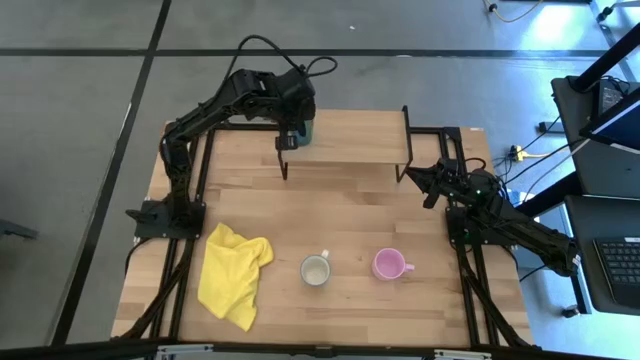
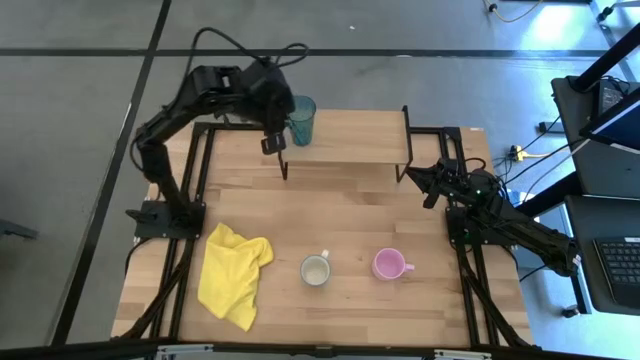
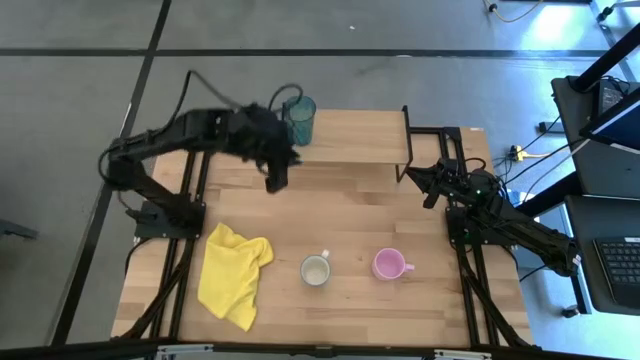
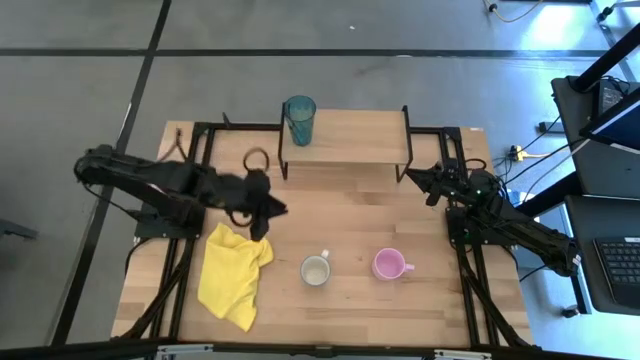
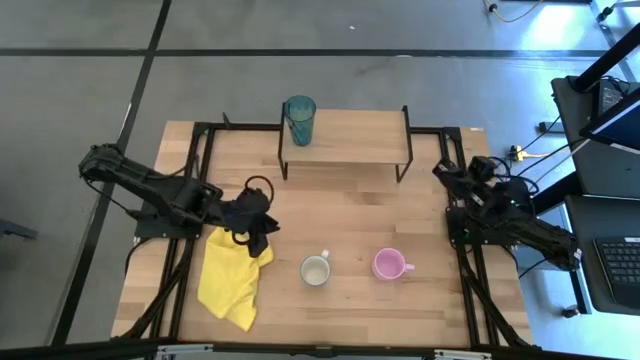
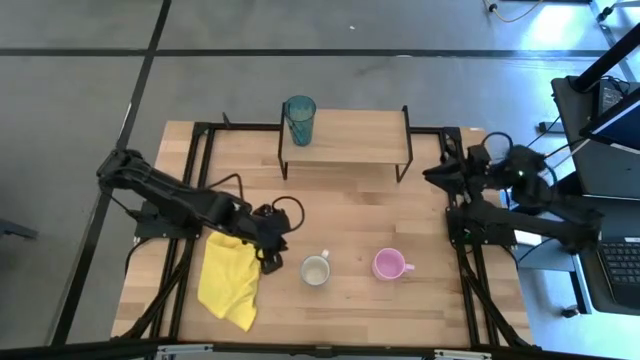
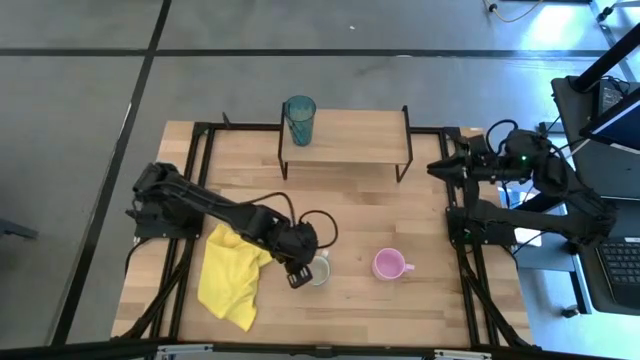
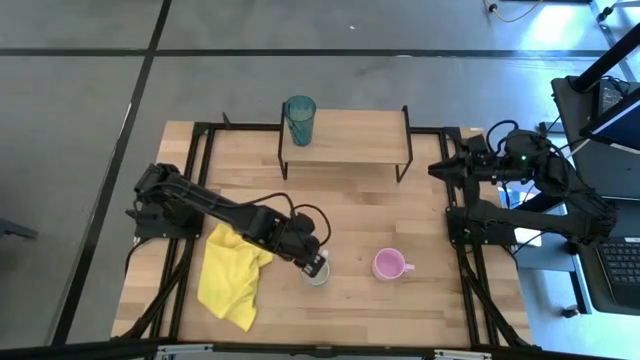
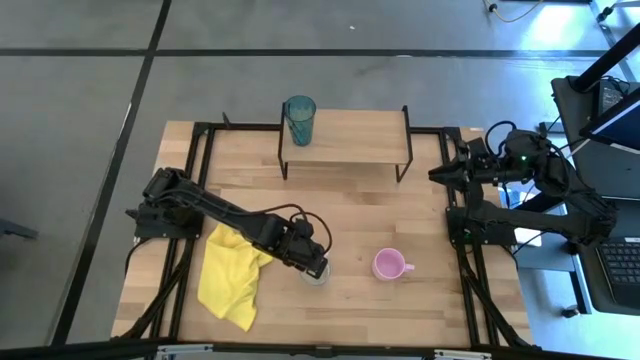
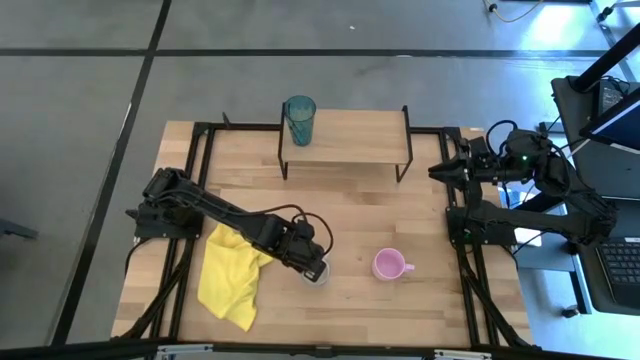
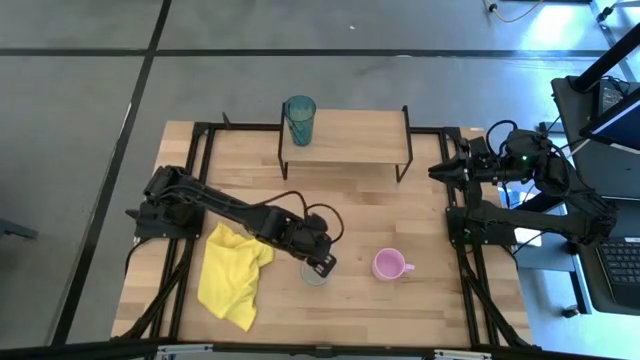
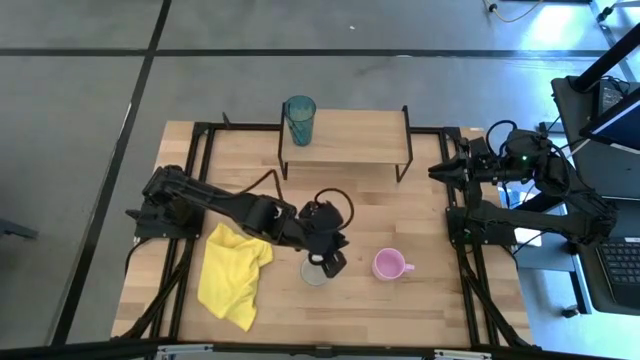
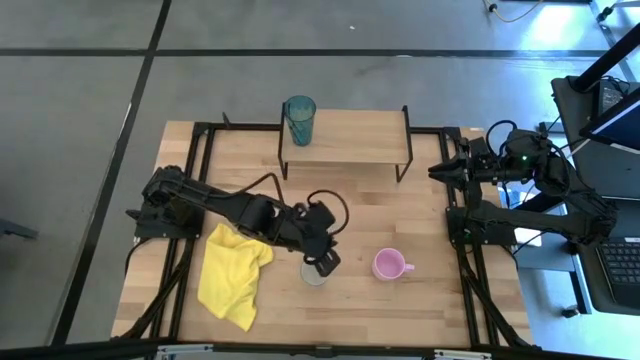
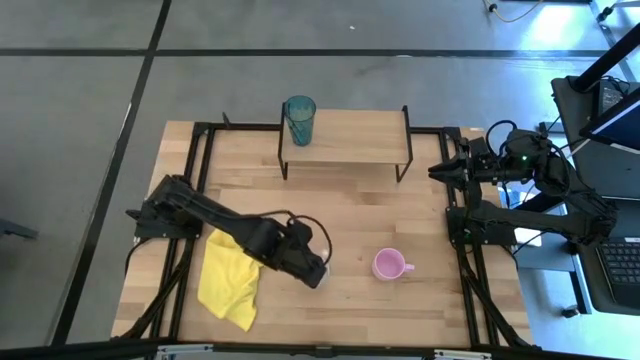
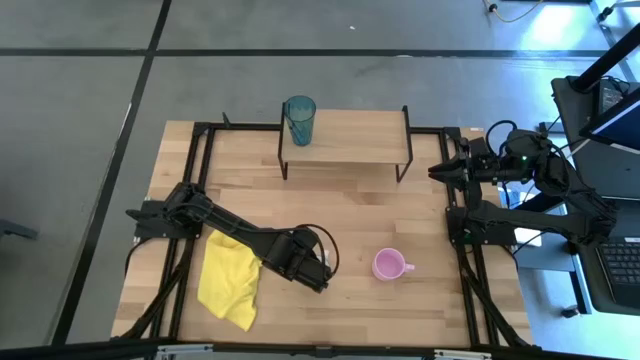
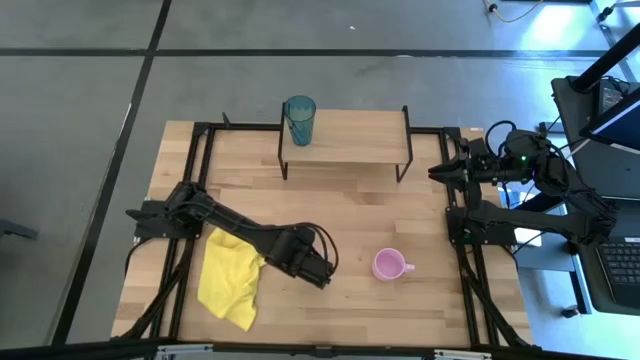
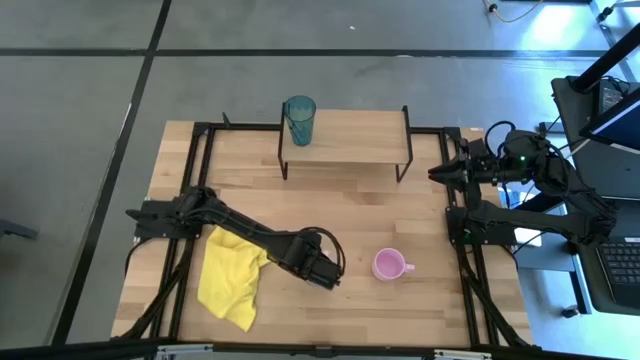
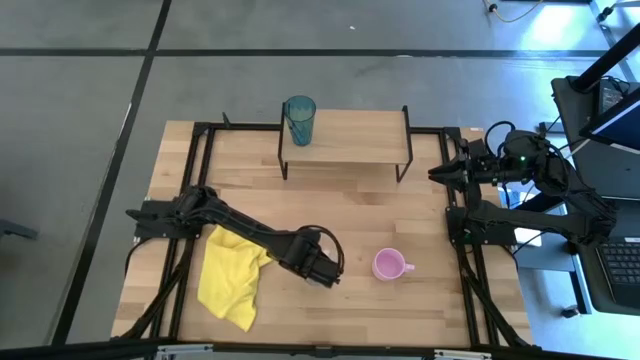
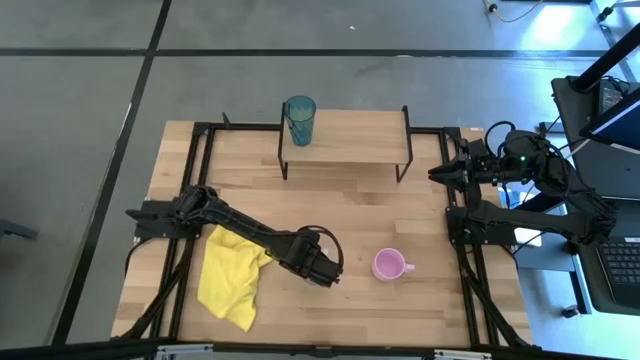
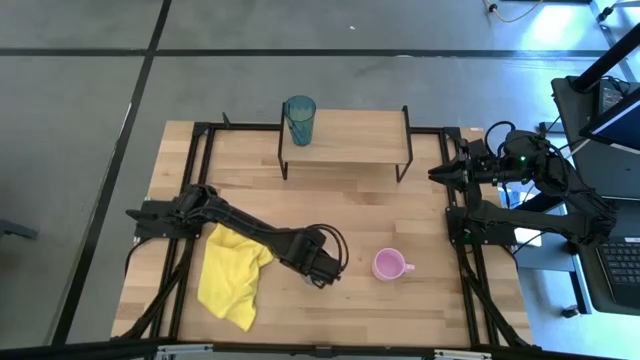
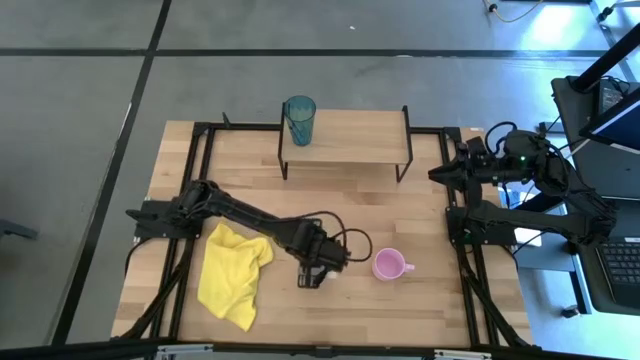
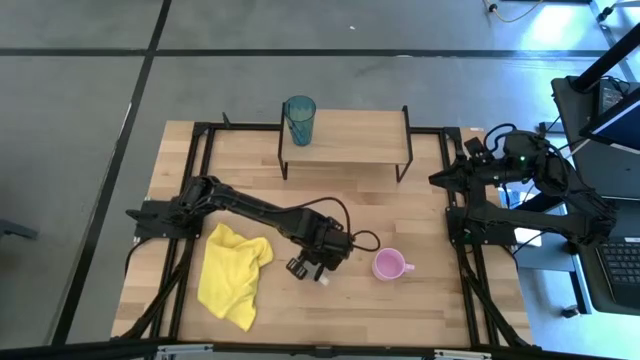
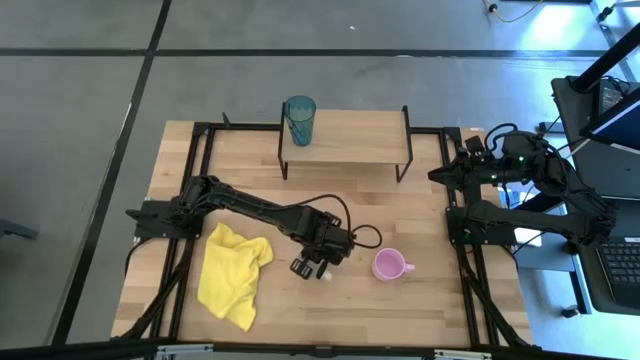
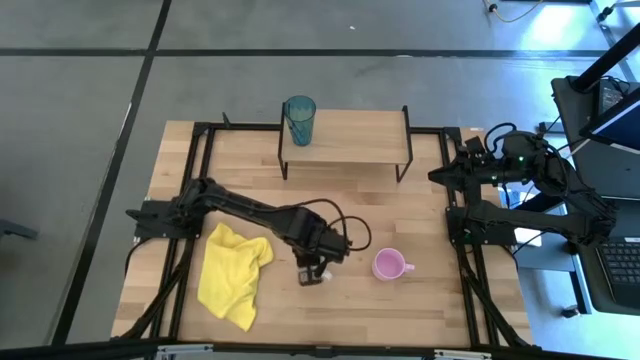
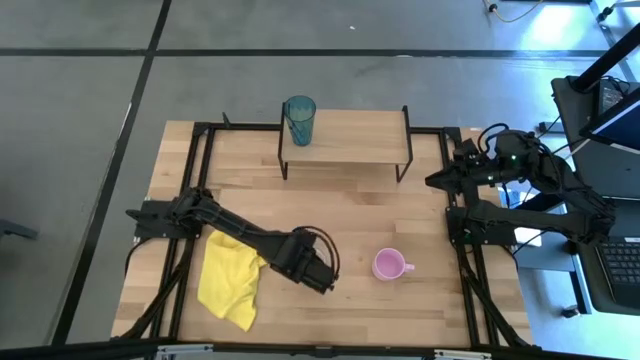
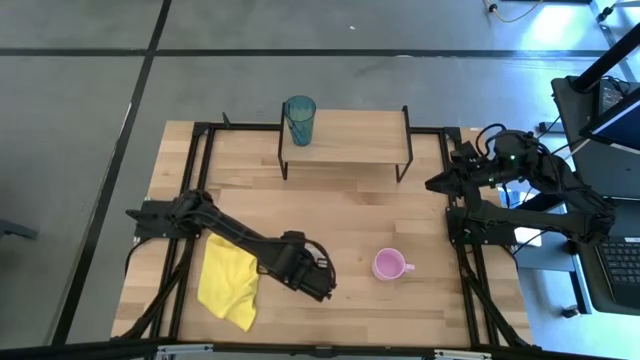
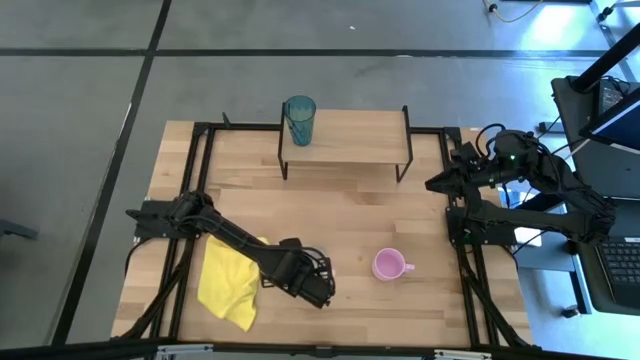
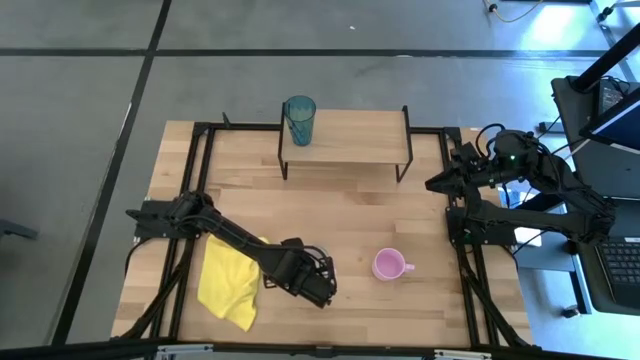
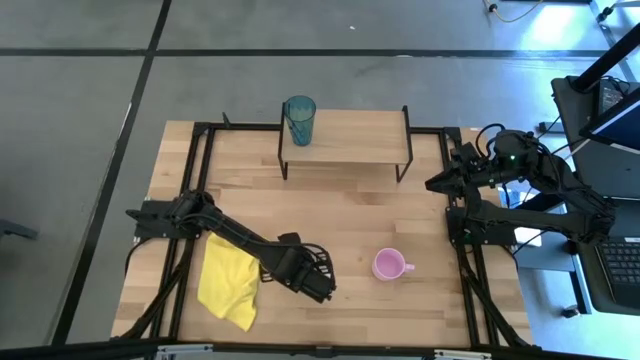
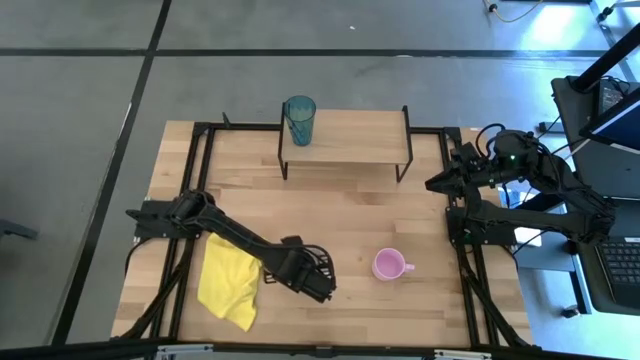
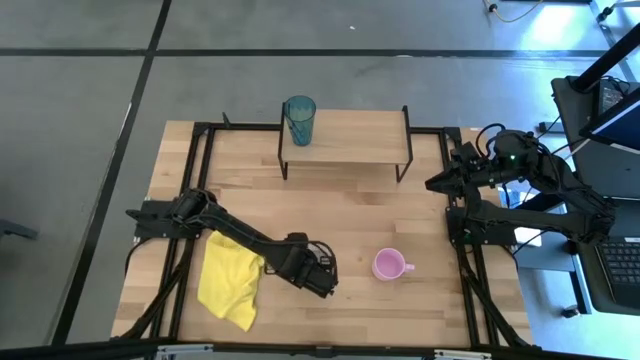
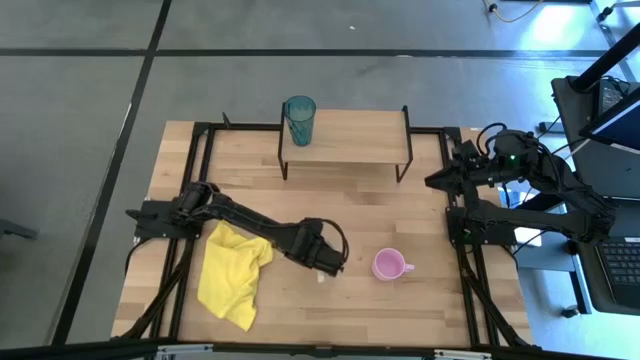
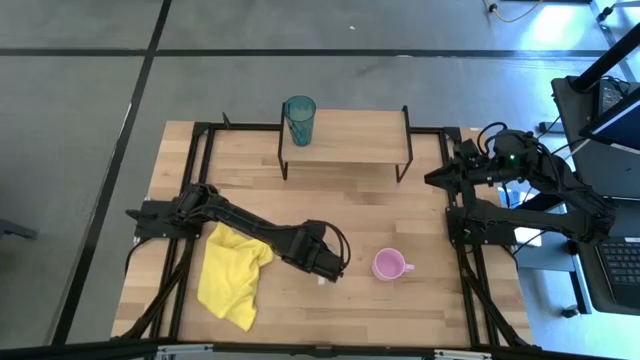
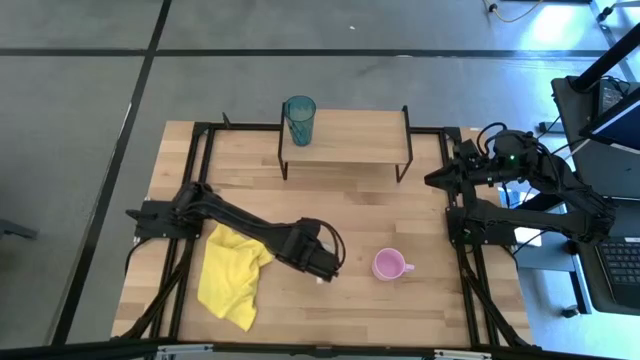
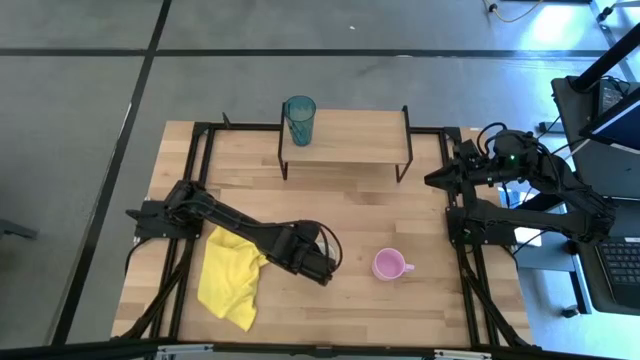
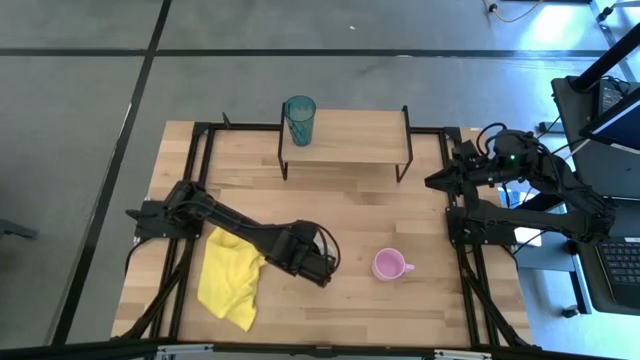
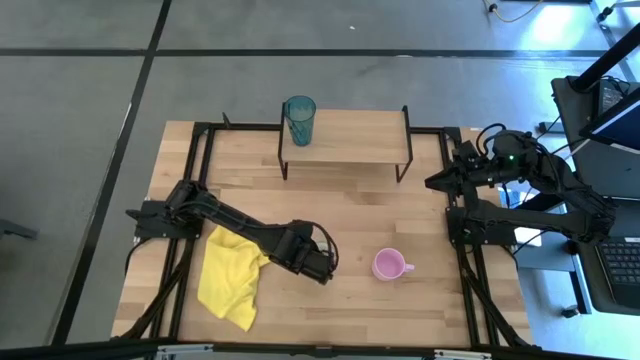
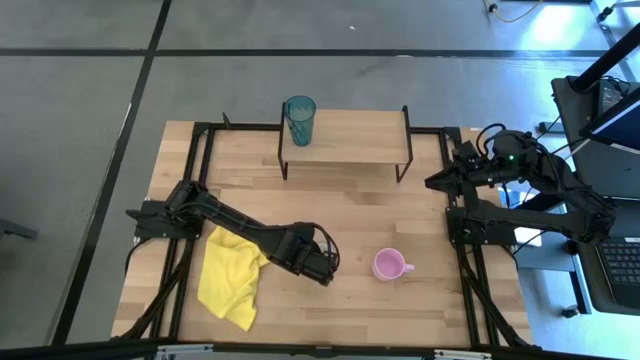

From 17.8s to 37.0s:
Task: Stack small to large cups/mugs on shelf
Put the red cup on the shelf
